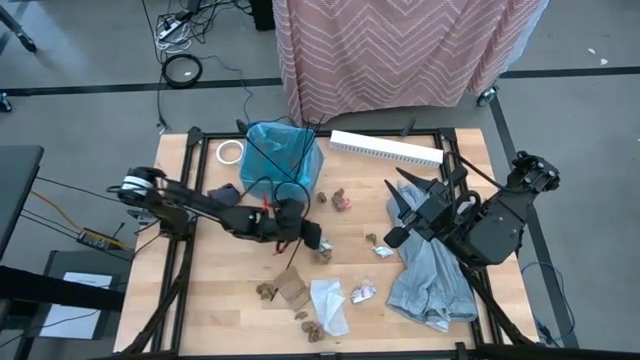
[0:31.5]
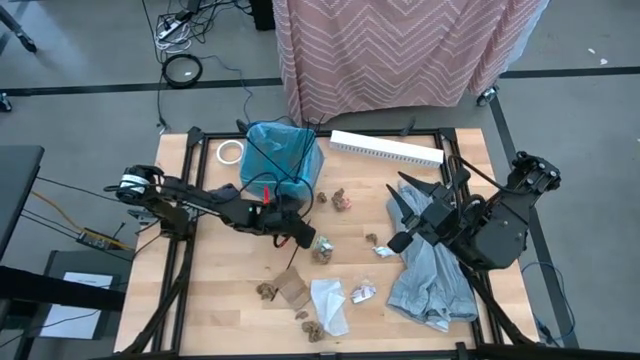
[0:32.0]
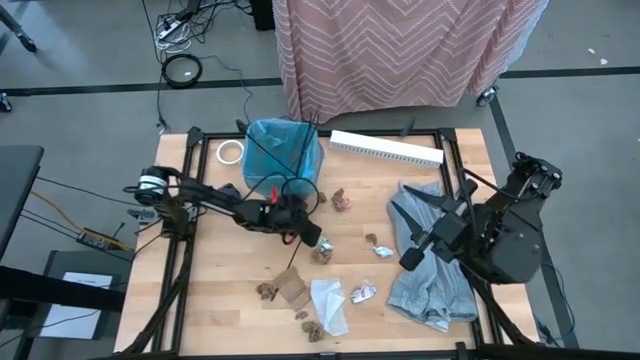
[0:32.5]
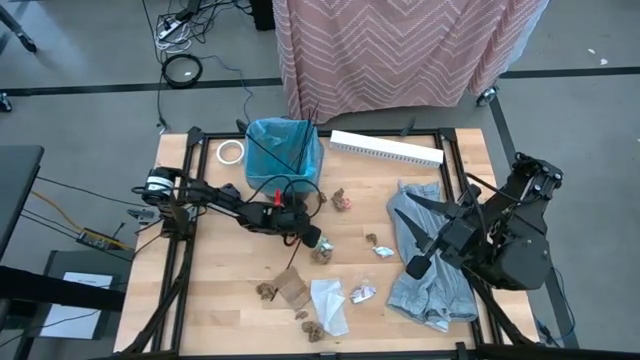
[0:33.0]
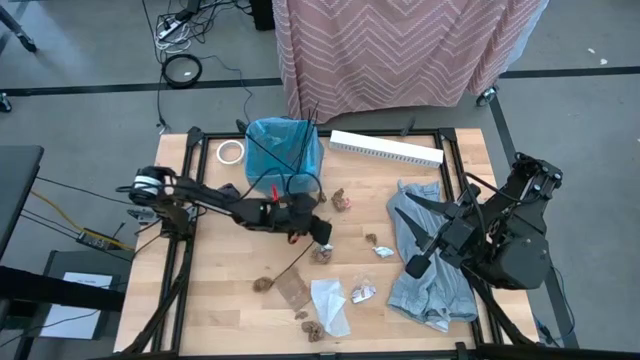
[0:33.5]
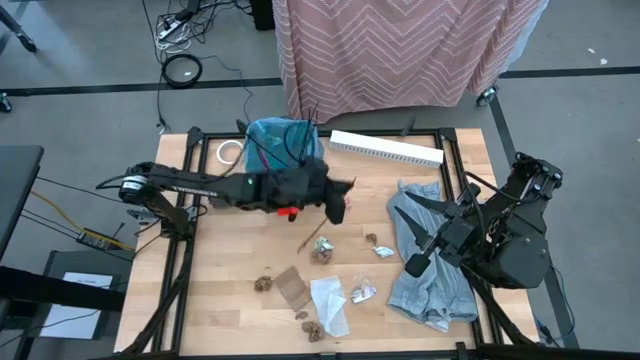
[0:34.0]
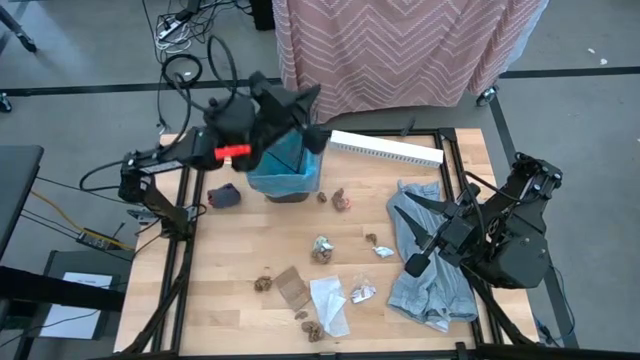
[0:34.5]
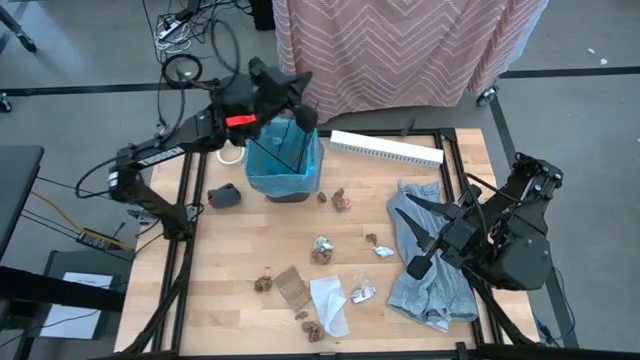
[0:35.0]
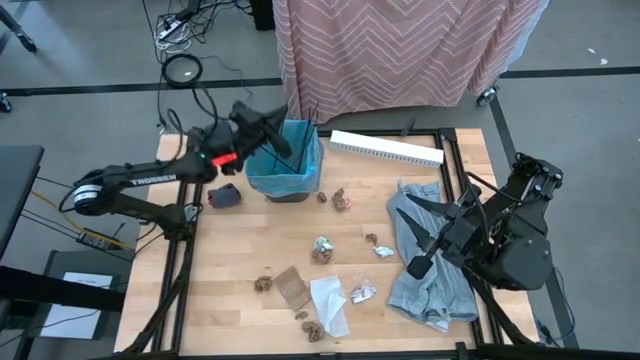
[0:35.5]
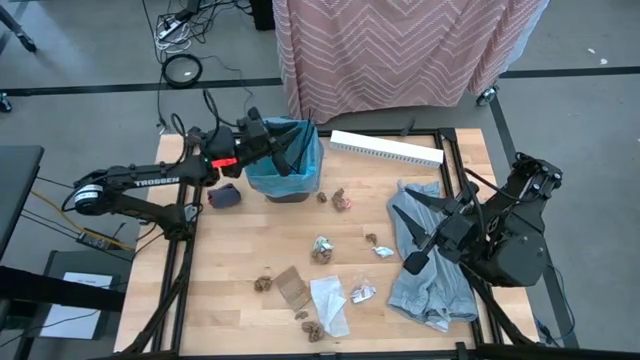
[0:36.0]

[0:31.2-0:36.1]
Task: place trash/remove bag and relplace
Put the black zip tie into the black trash bin

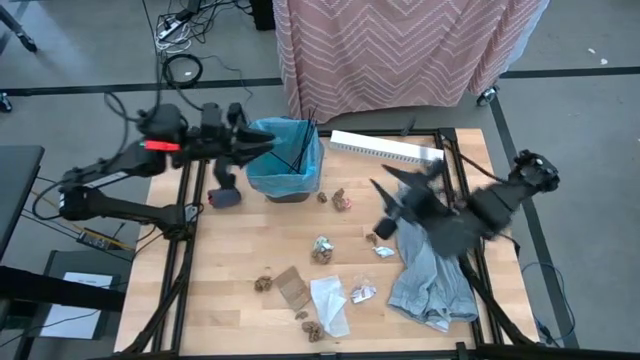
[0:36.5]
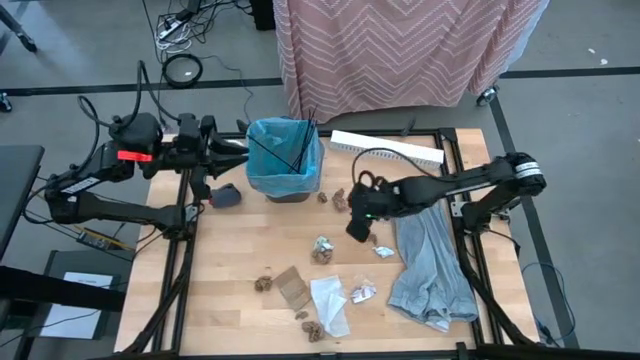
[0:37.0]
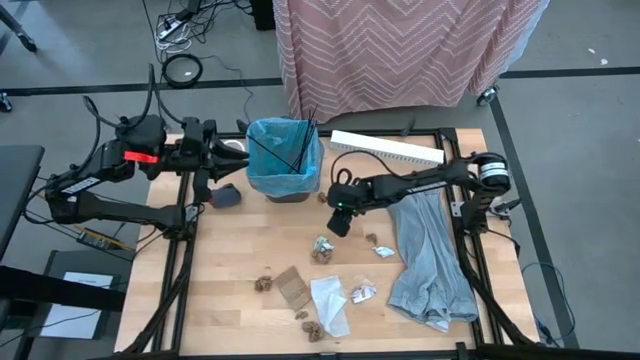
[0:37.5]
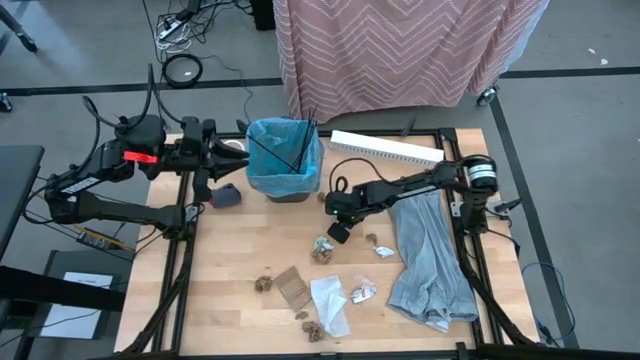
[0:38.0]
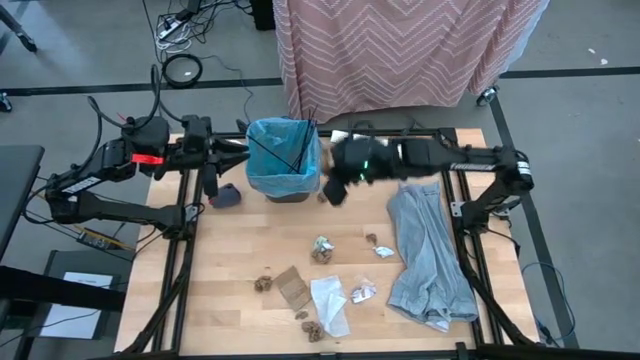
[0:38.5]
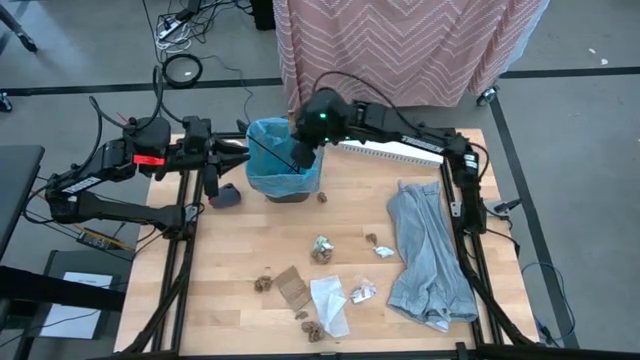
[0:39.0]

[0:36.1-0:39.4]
Put the brown napkin into the black trash bin

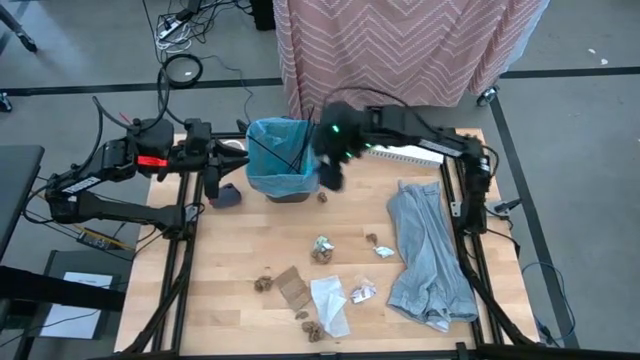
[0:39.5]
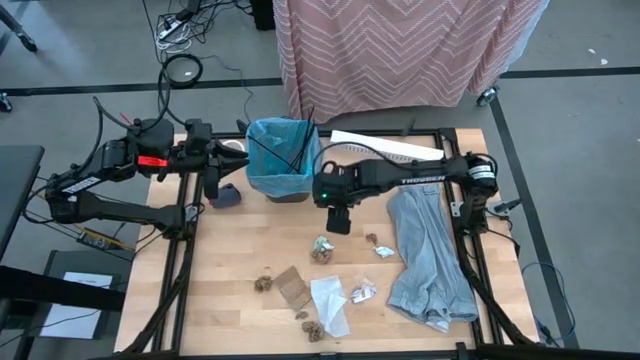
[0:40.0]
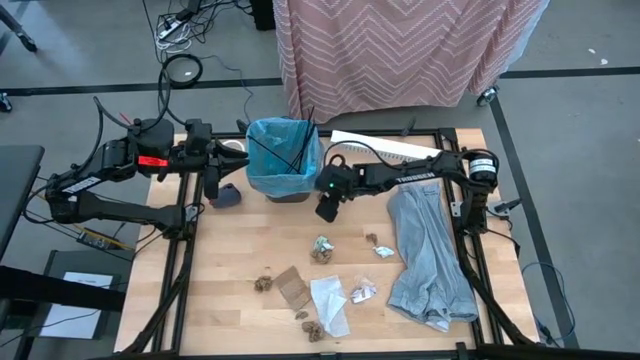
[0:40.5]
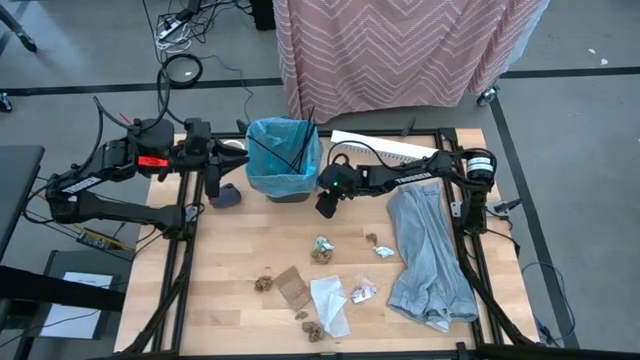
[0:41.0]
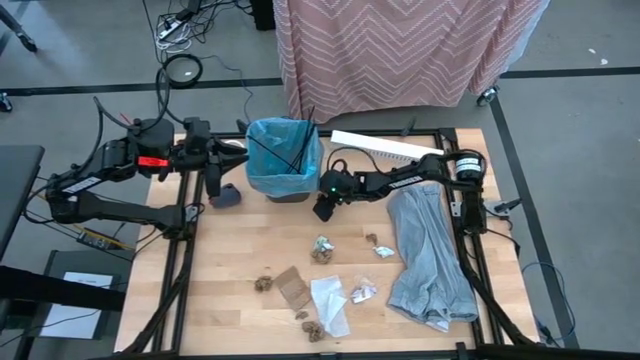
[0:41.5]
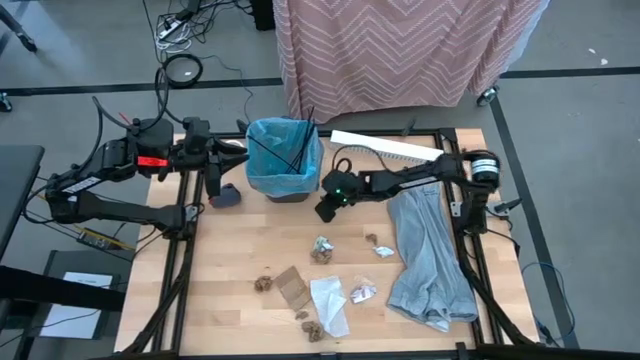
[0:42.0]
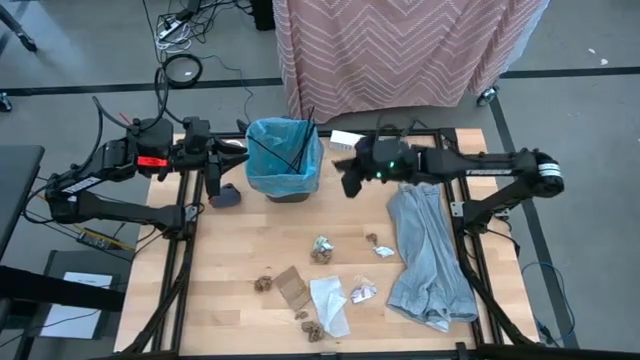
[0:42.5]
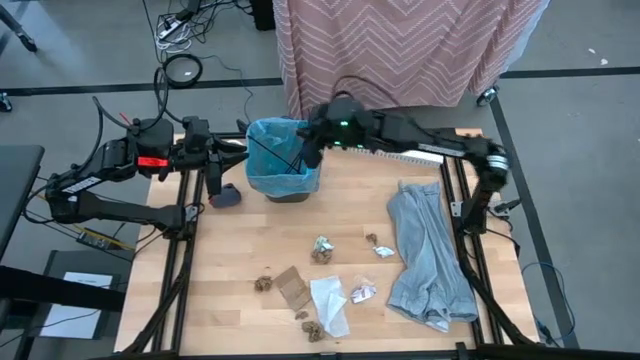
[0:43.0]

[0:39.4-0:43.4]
Put the brown napkin into the black trash bin

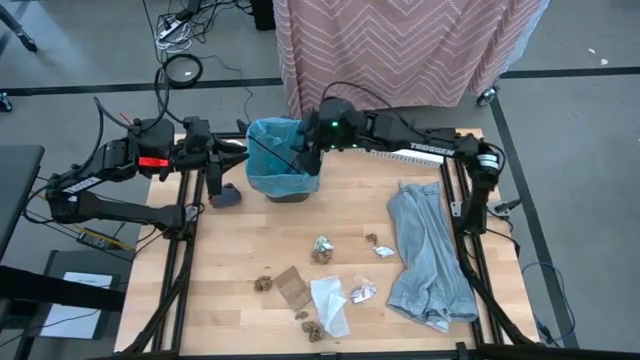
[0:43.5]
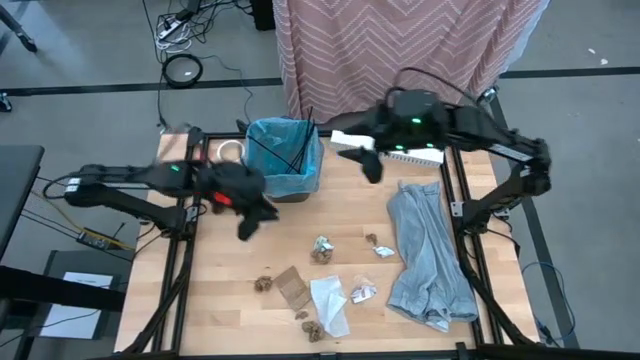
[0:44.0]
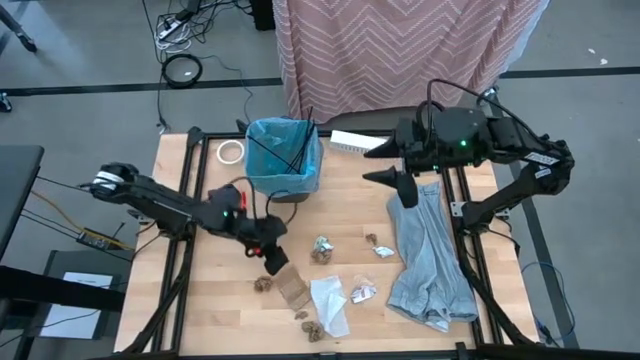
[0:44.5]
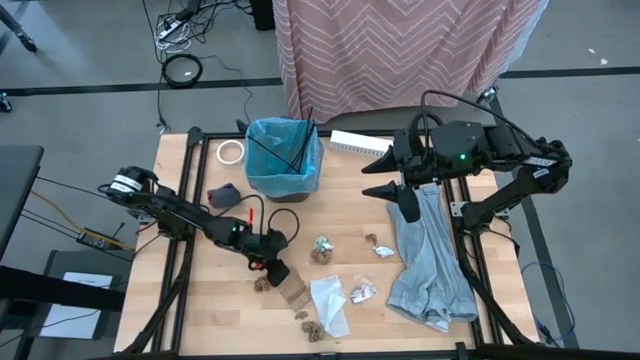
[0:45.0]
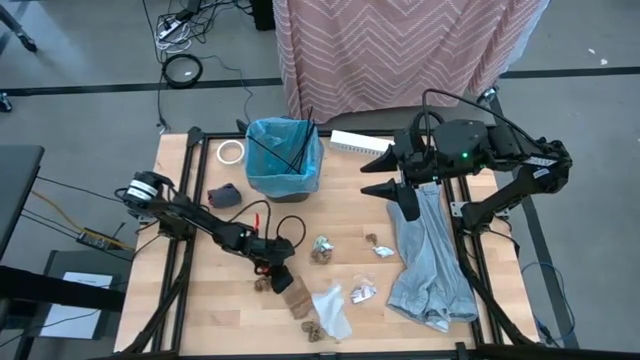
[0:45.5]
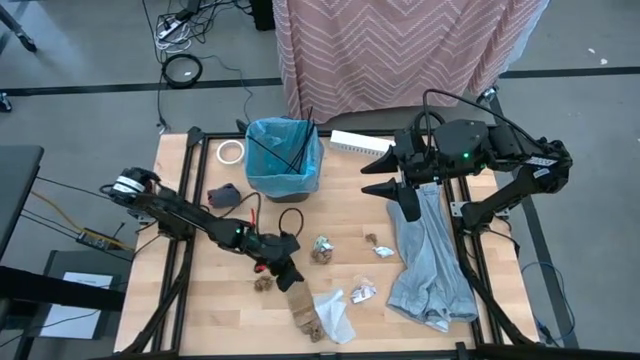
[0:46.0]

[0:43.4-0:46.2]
Put the piece of cardboard into the black trash bin

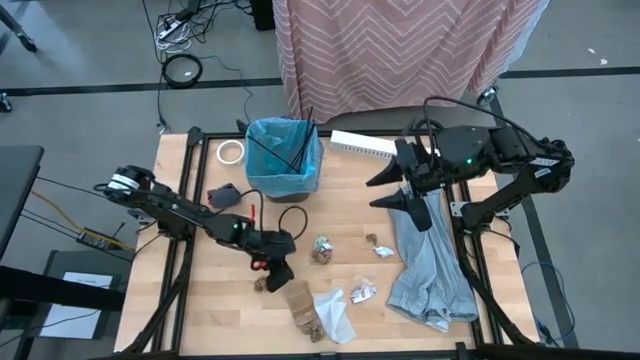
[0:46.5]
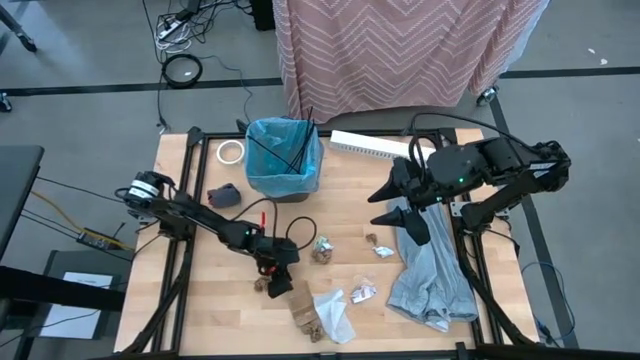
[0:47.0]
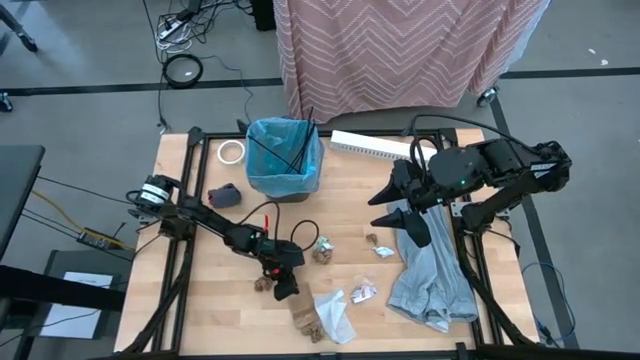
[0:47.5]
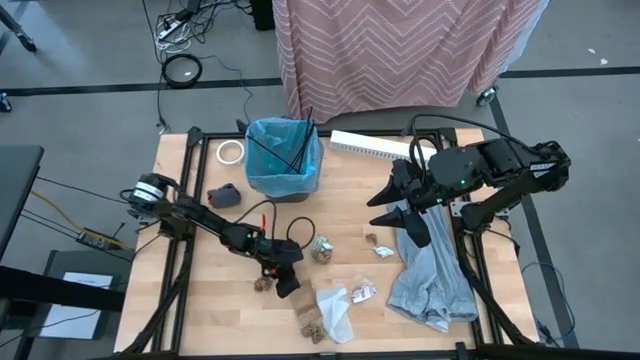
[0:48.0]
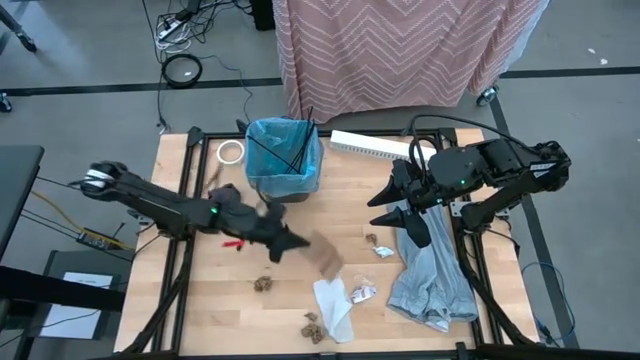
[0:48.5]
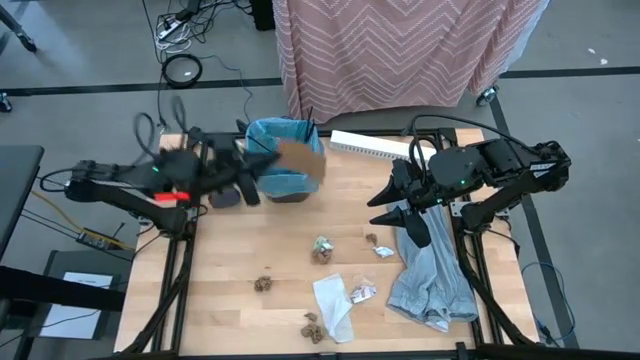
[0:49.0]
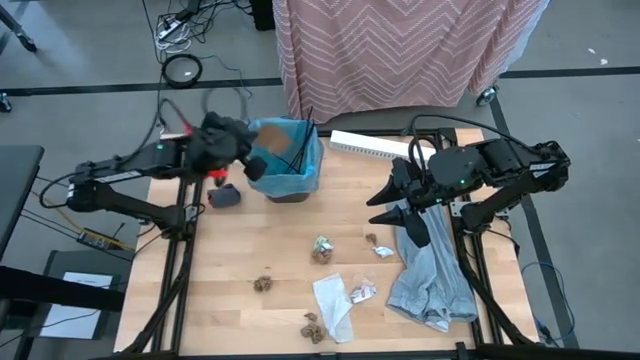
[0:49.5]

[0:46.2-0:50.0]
Put the piece of cardboard into the black trash bin

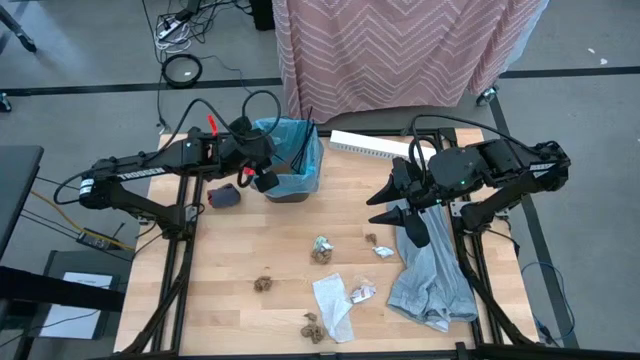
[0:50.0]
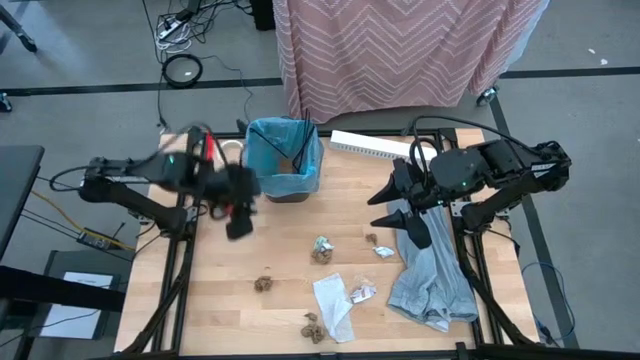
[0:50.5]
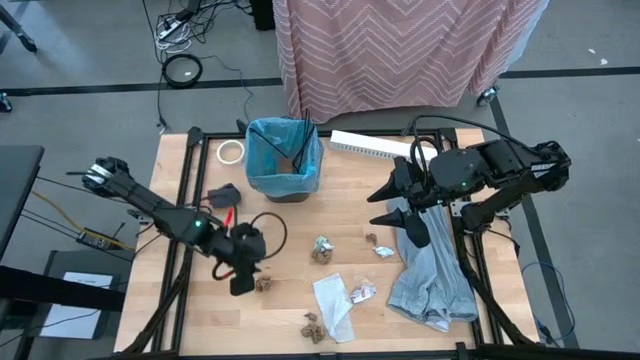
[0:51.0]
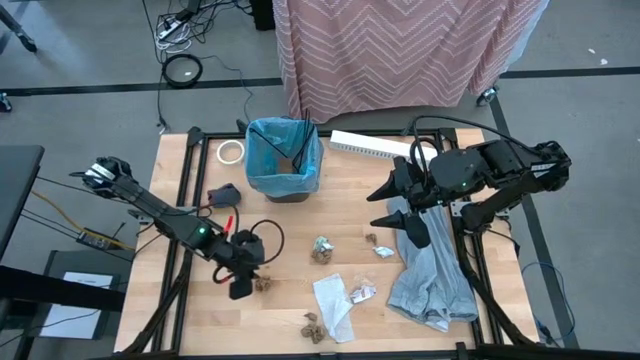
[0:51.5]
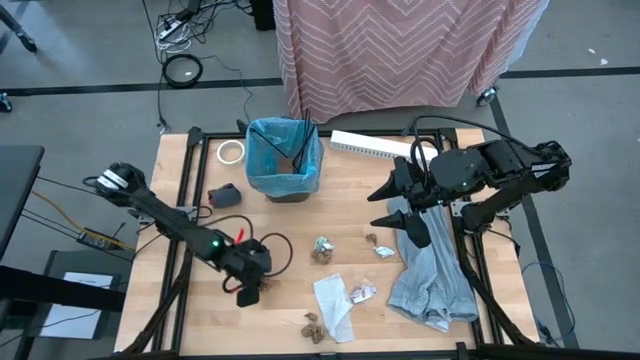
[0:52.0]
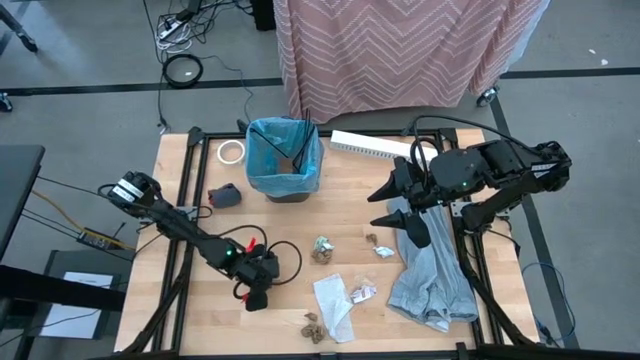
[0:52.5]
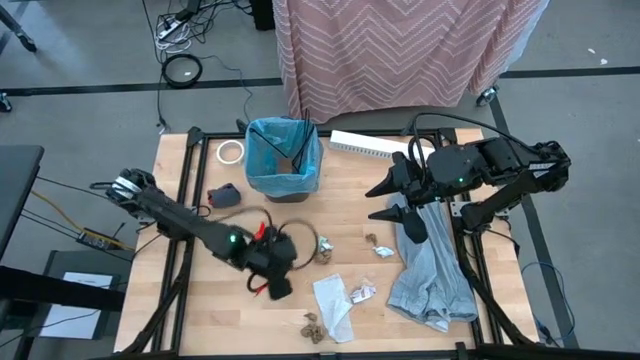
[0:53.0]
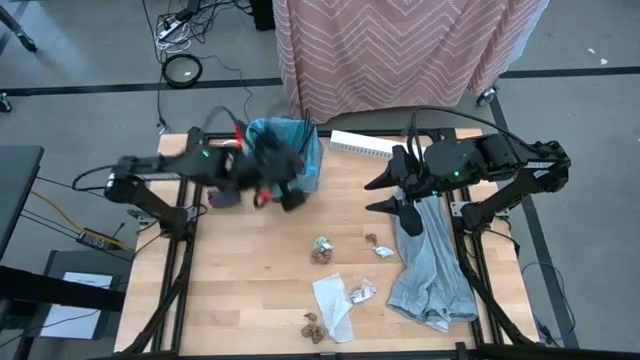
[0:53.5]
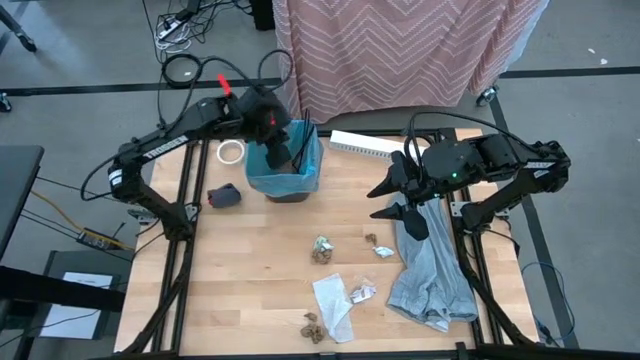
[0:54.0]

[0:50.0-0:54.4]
Put the brown napkin into the black trash bin
